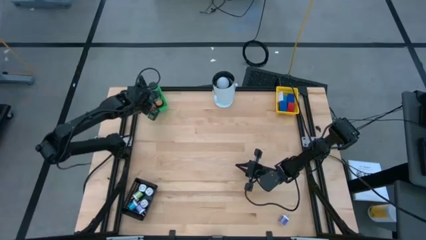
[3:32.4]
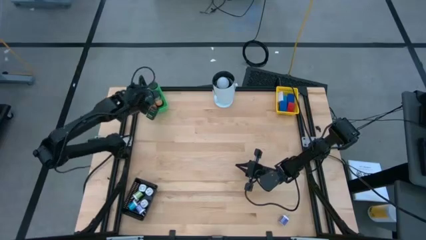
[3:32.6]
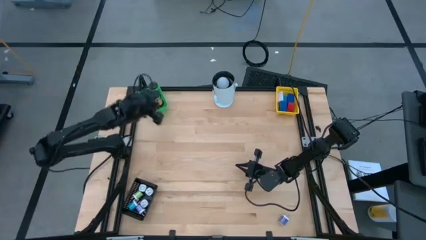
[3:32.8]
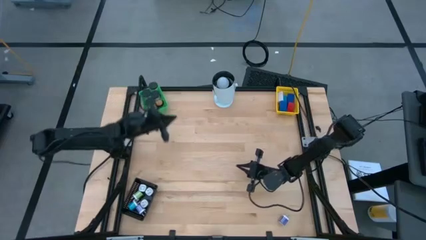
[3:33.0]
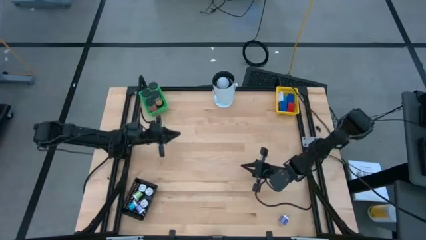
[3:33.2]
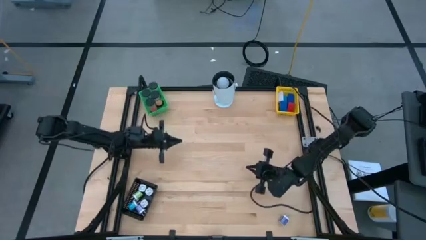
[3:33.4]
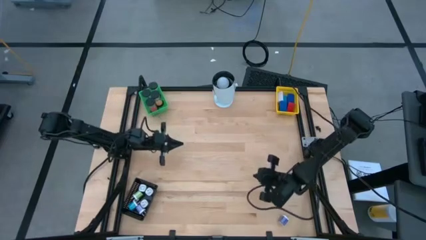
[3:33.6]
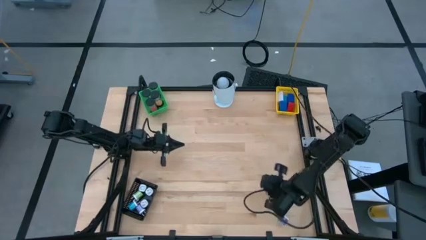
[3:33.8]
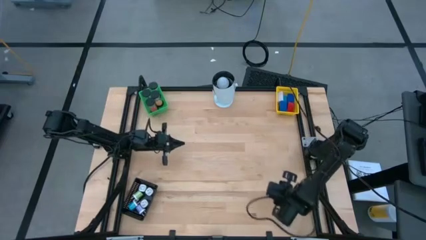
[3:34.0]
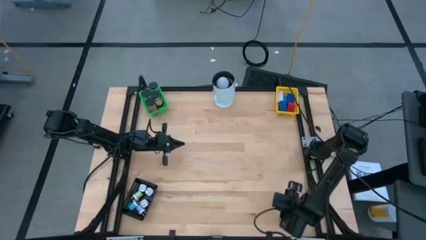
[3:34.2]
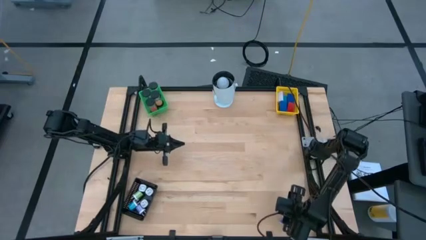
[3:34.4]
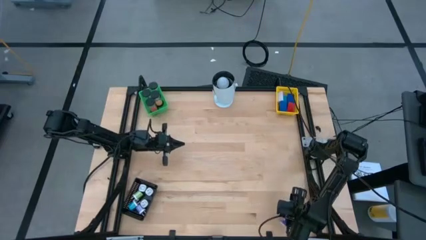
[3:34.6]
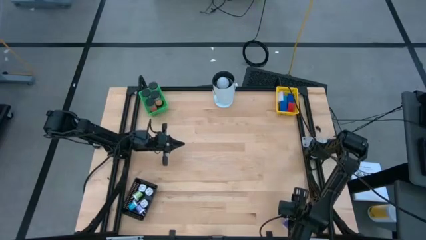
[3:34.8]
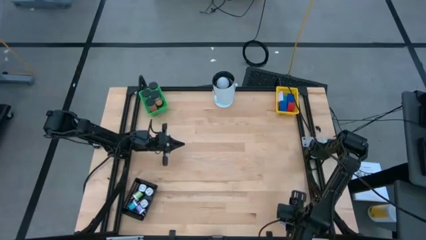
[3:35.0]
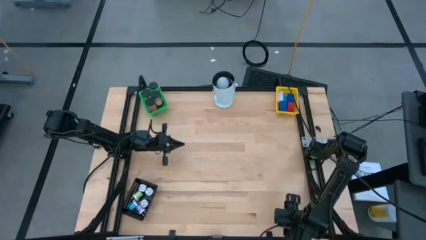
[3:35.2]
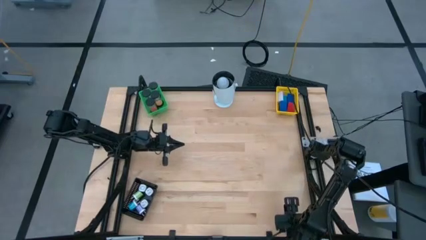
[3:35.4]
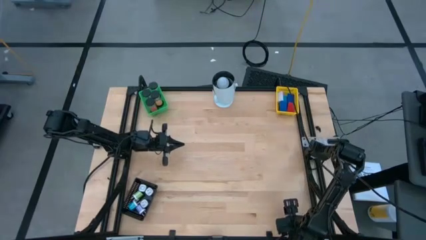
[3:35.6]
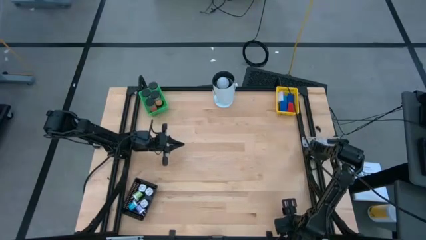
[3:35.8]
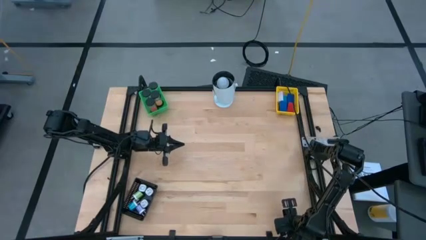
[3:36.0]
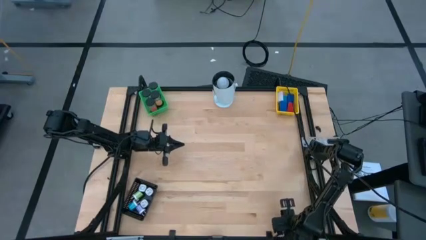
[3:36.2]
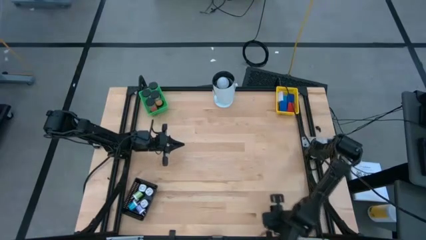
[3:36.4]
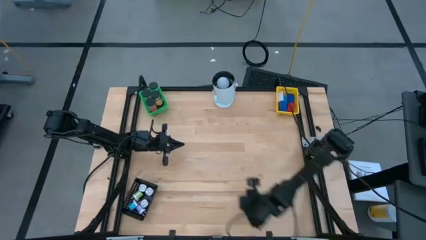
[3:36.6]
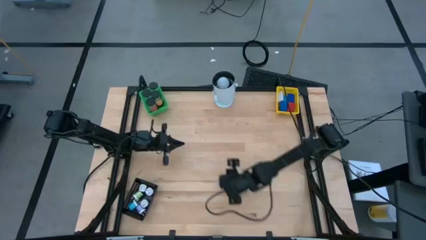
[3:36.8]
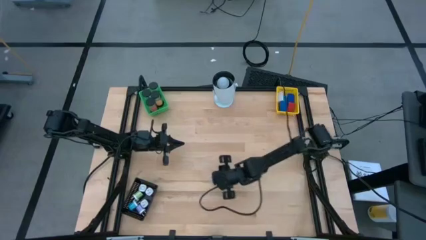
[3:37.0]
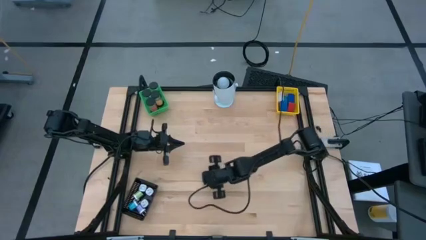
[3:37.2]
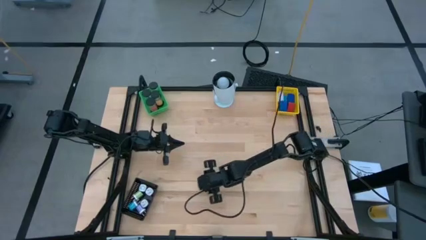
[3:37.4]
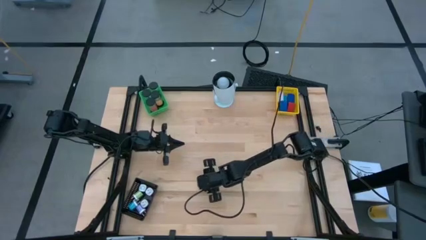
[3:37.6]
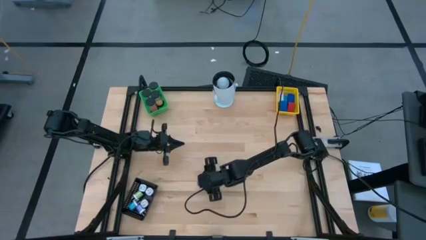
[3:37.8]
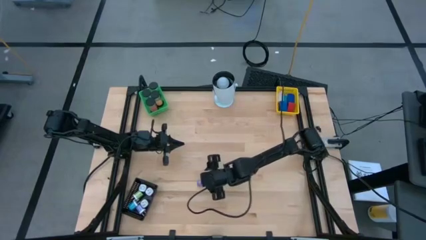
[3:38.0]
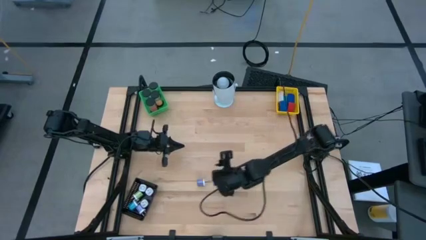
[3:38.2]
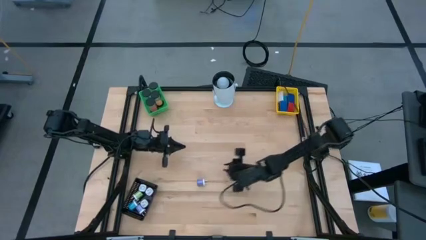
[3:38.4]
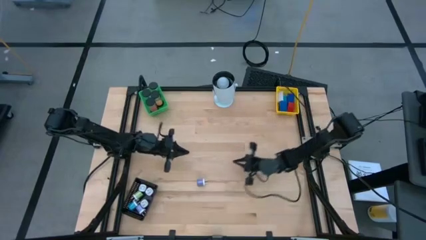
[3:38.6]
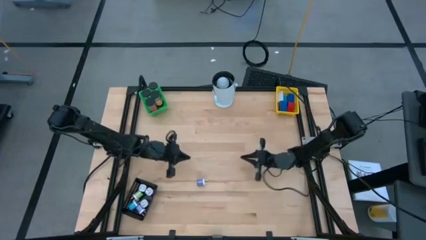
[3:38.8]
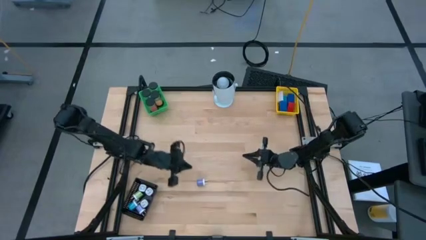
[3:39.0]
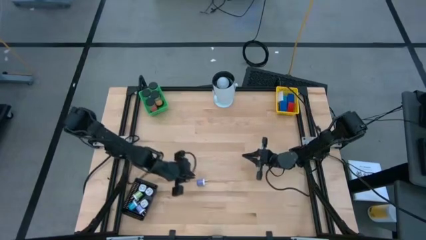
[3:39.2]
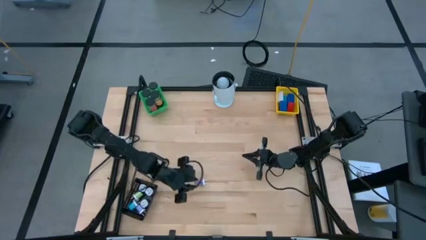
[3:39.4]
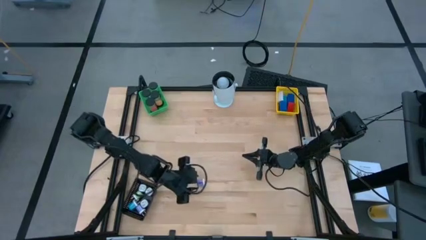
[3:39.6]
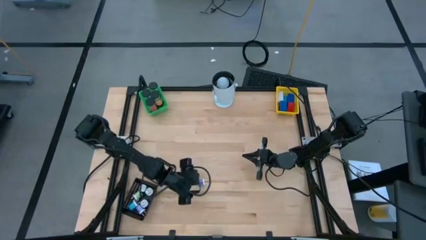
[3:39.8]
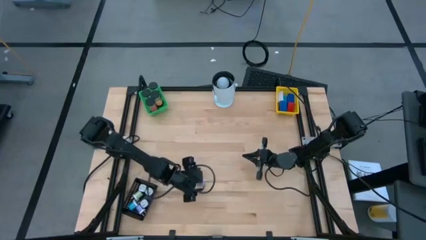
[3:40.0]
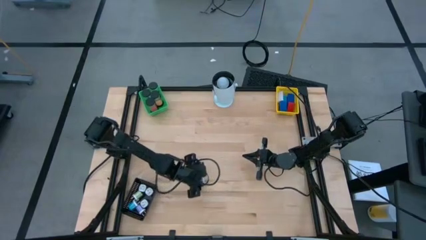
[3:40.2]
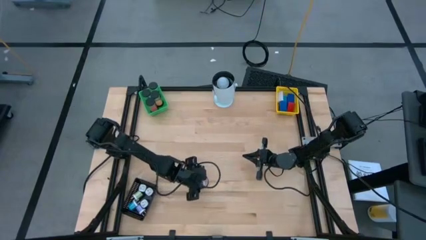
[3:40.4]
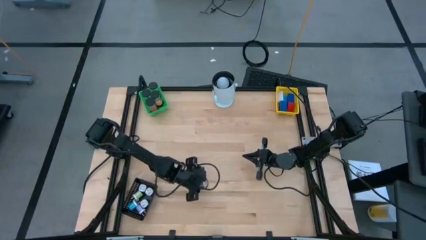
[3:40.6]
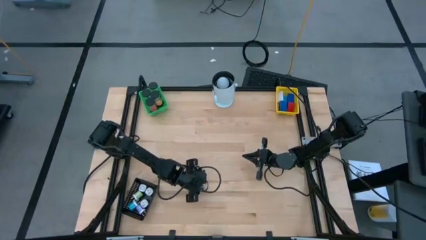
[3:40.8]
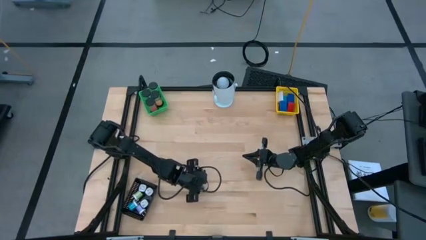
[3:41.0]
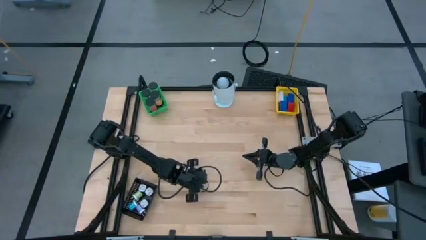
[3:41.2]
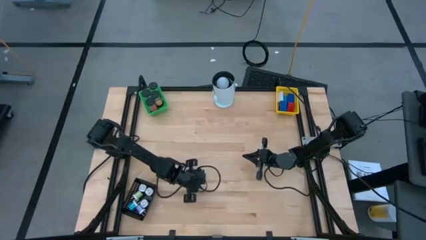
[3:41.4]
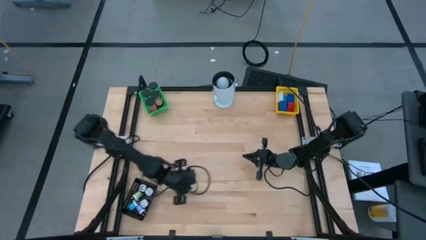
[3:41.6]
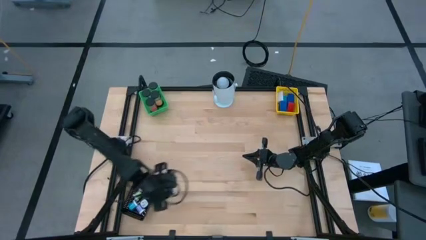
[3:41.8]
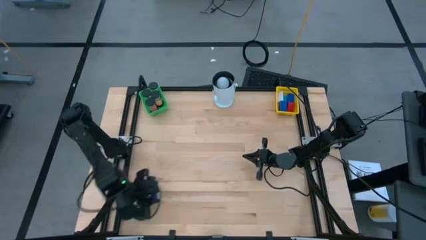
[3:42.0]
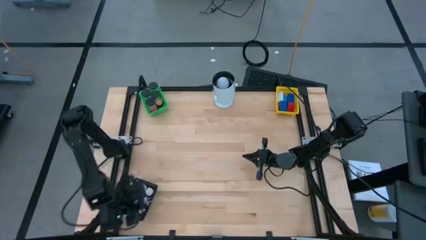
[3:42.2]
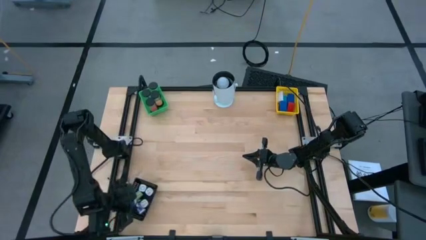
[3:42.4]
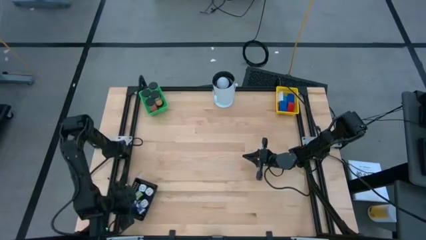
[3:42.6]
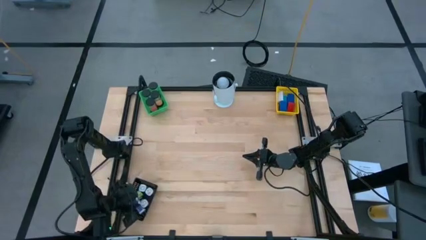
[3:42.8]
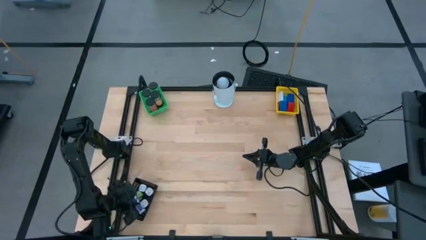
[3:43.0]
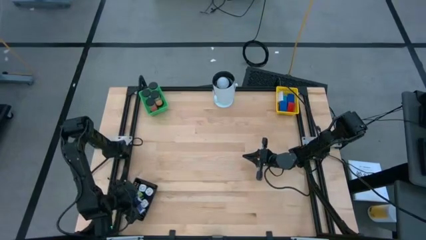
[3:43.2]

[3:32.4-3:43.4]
Task: Pick & Place Office items
Put the purple charger adaptor into the black bin

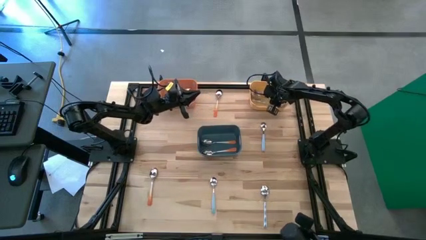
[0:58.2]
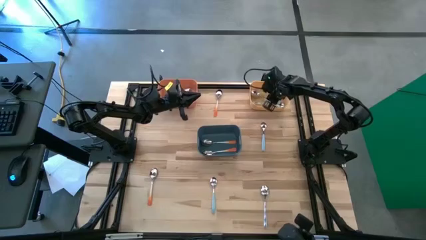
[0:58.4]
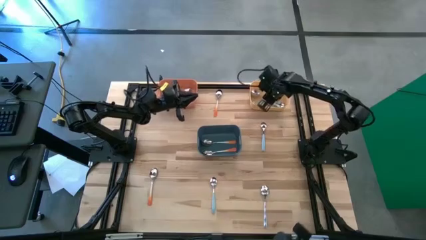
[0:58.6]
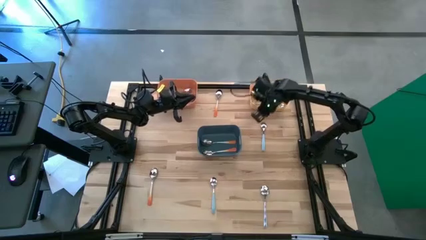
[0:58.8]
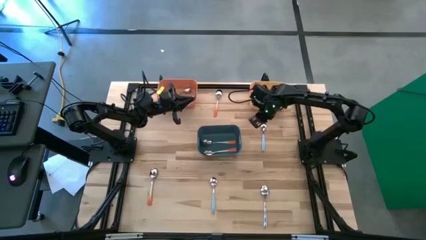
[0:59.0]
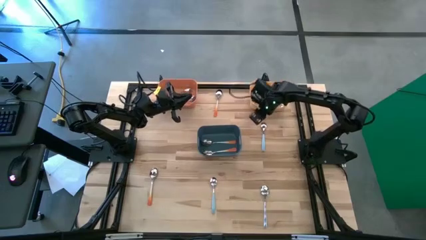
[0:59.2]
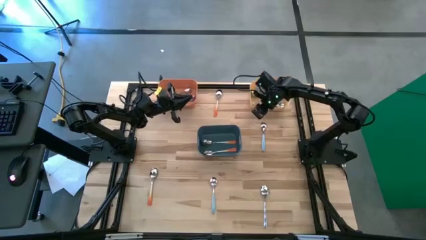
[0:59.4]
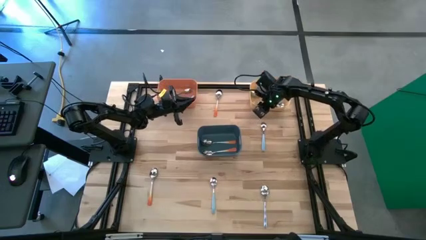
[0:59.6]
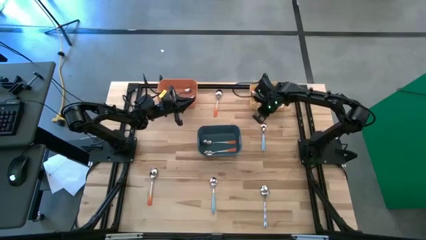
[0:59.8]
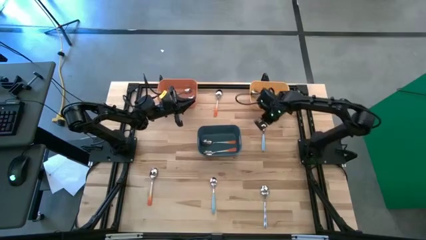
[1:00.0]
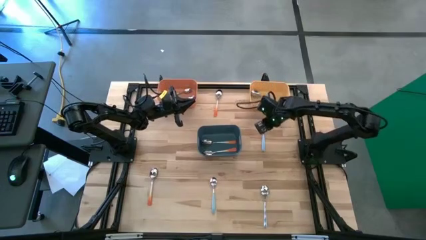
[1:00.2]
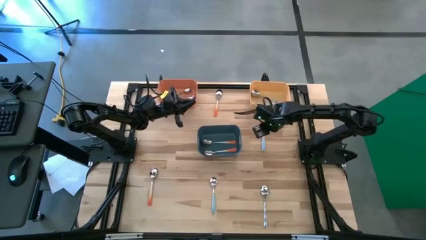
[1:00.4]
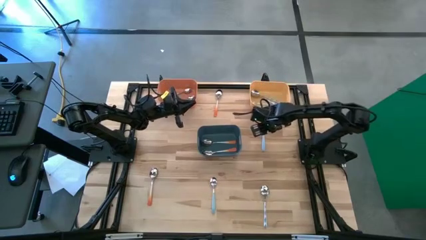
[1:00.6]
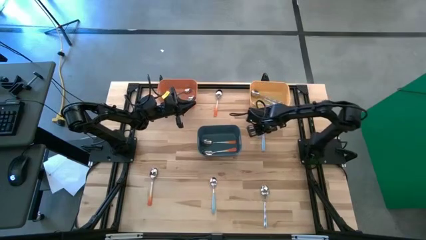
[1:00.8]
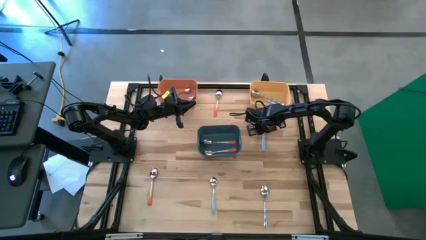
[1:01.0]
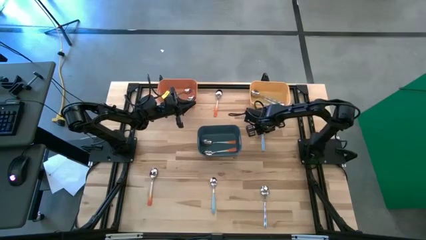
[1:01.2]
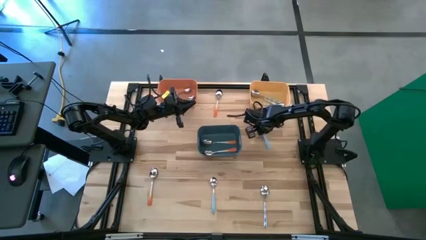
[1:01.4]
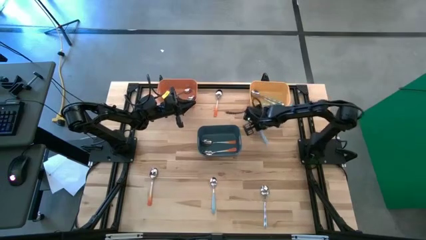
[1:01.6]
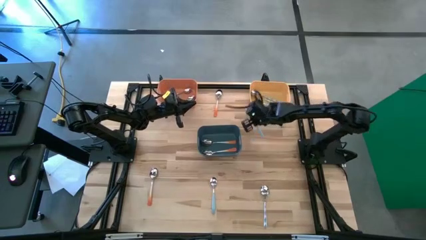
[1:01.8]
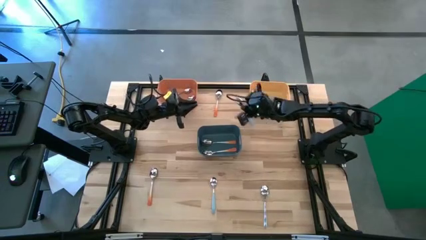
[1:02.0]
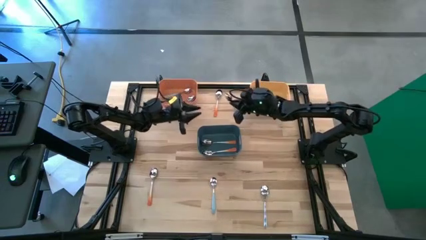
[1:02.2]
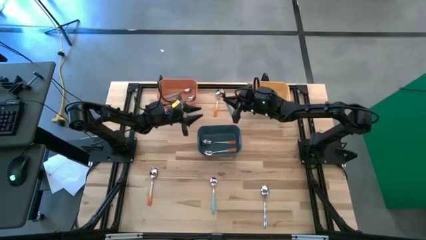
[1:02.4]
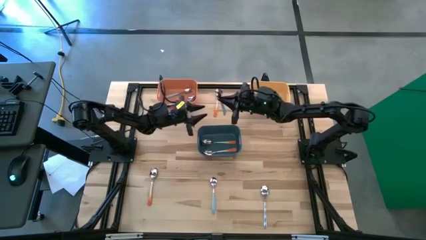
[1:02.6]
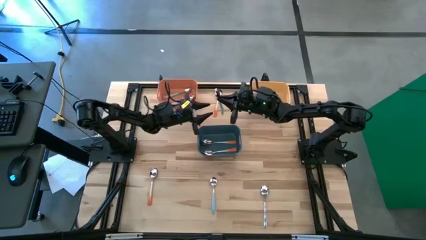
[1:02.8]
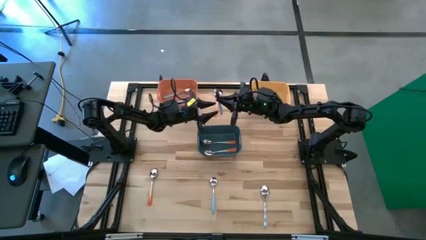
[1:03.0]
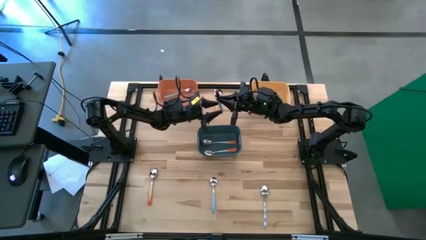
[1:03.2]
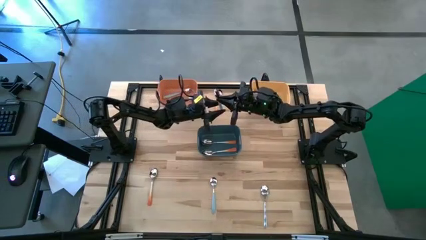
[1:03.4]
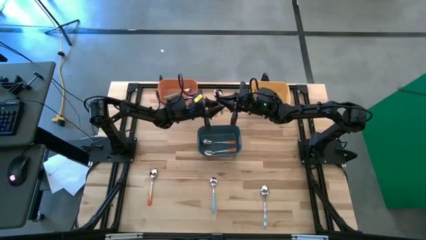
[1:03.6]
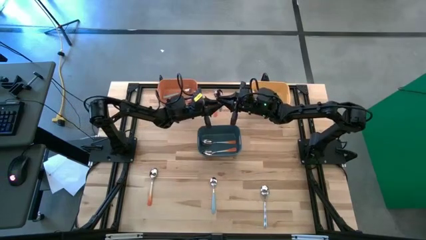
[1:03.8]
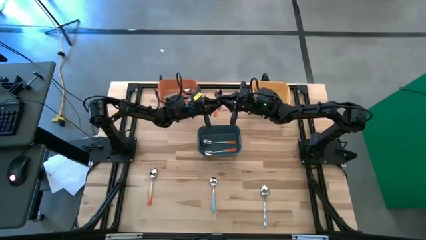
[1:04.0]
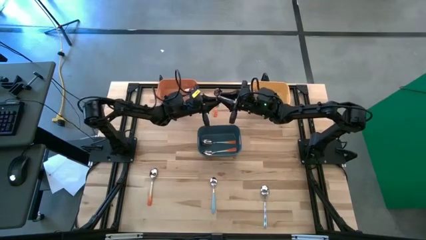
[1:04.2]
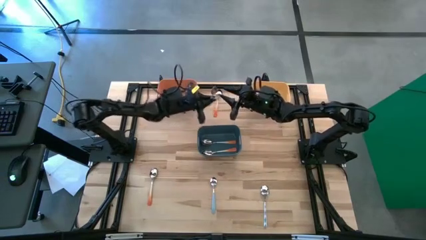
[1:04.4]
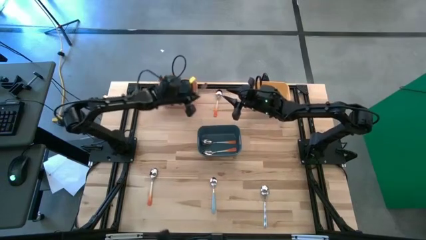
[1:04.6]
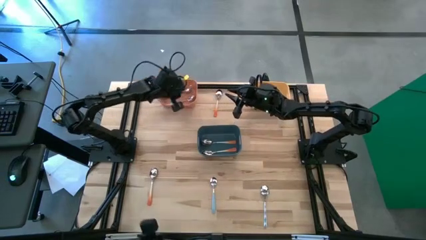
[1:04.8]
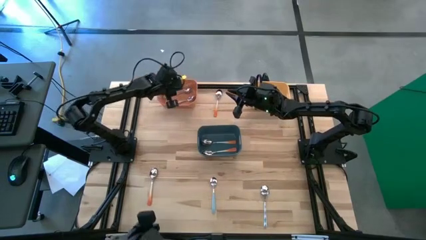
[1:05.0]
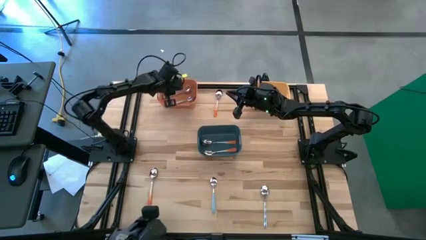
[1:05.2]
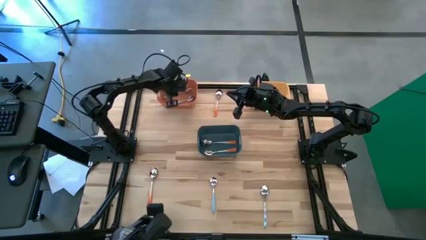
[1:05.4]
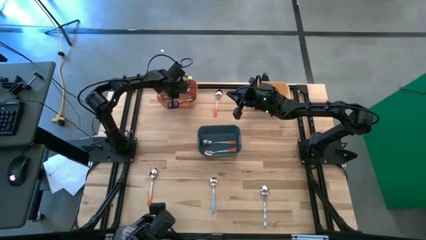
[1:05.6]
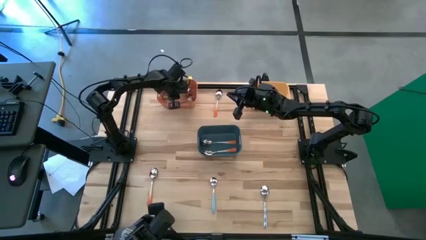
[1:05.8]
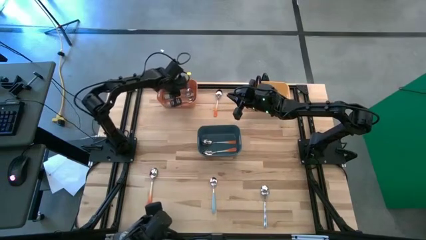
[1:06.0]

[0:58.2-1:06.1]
Task: Sort silverware by color (type)
Put the blue spoon into the orange bin
